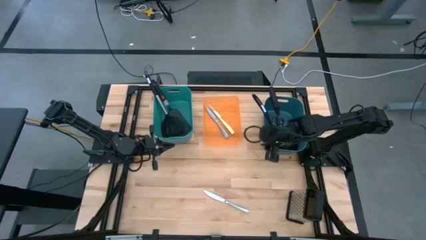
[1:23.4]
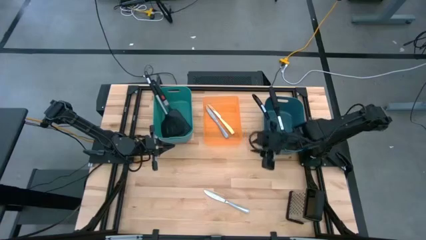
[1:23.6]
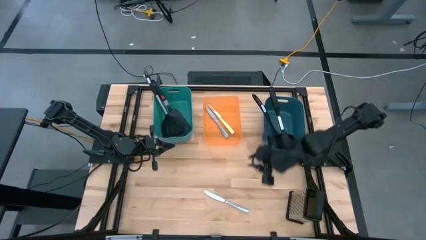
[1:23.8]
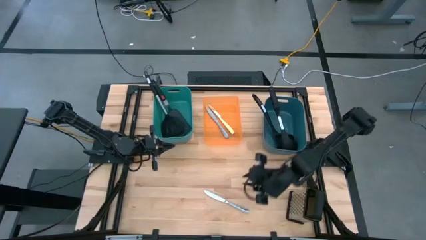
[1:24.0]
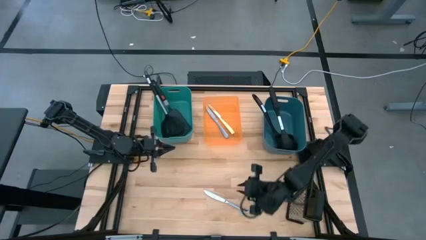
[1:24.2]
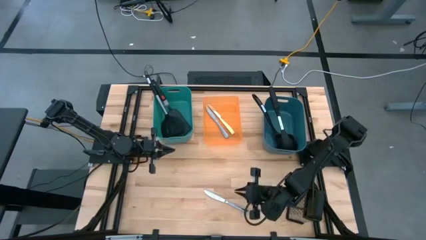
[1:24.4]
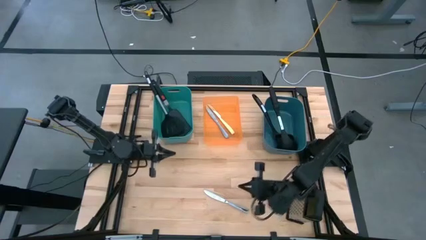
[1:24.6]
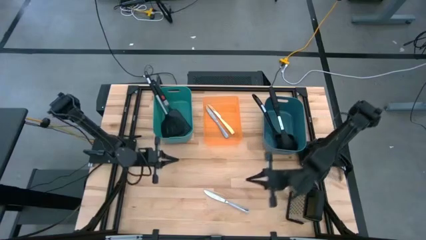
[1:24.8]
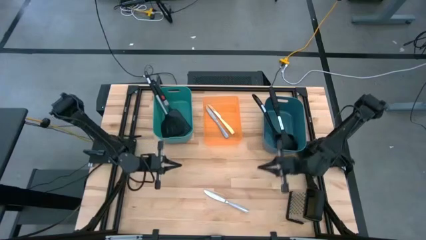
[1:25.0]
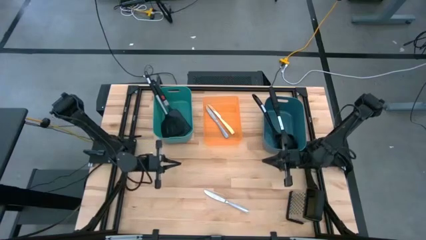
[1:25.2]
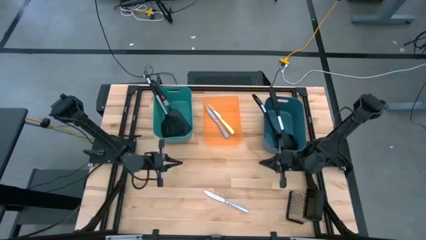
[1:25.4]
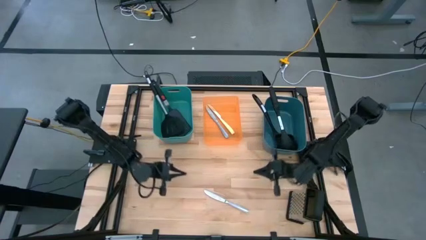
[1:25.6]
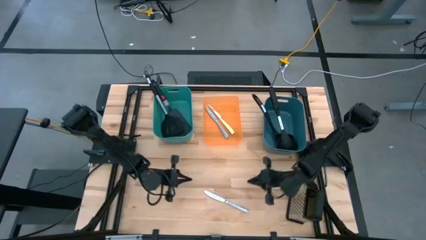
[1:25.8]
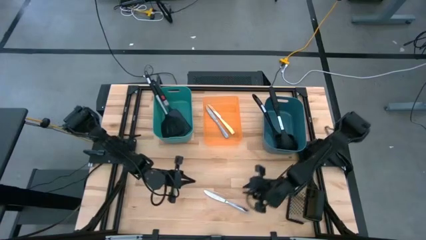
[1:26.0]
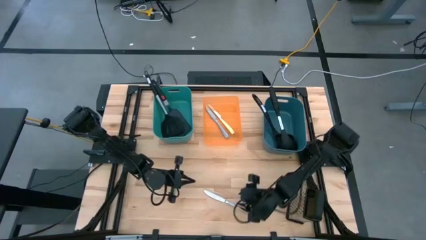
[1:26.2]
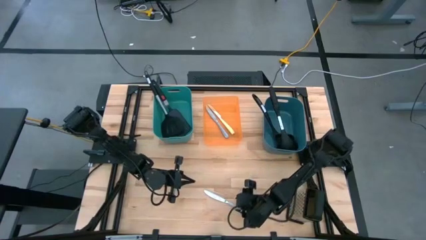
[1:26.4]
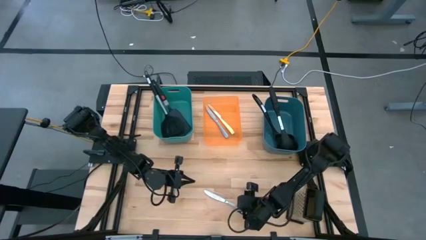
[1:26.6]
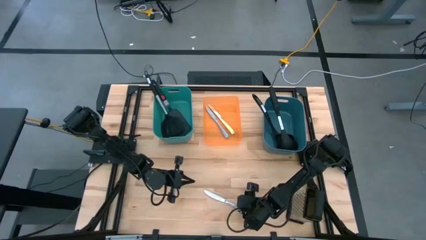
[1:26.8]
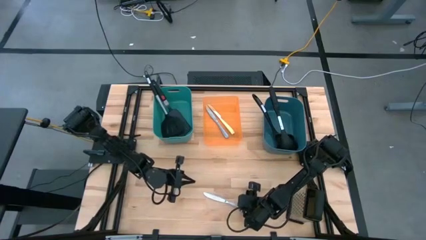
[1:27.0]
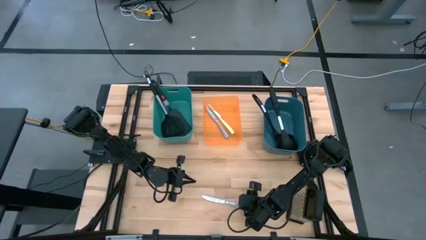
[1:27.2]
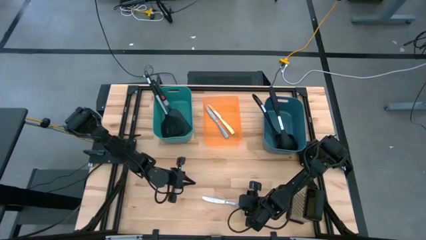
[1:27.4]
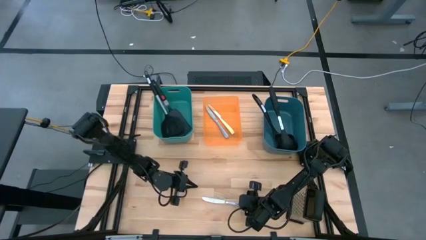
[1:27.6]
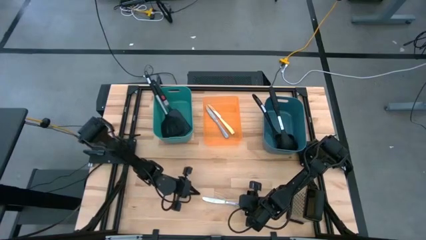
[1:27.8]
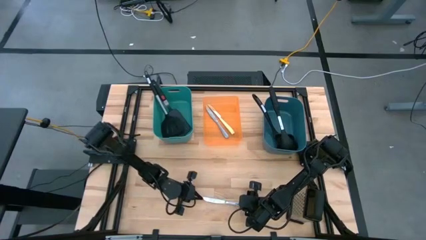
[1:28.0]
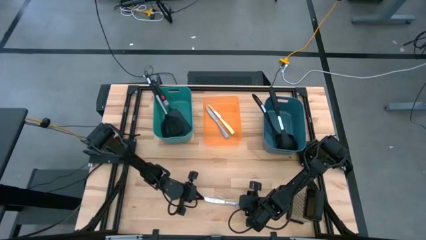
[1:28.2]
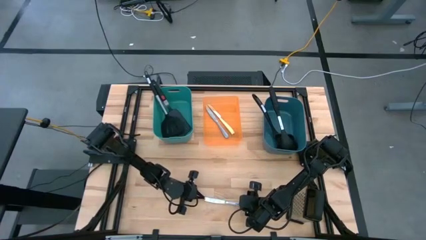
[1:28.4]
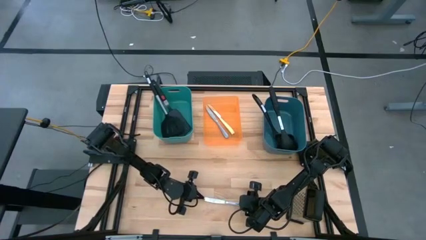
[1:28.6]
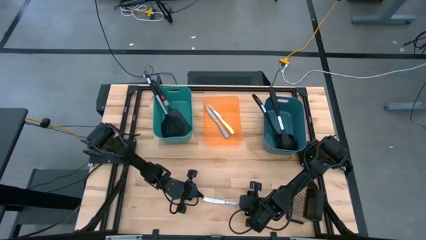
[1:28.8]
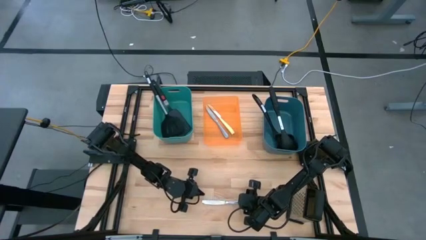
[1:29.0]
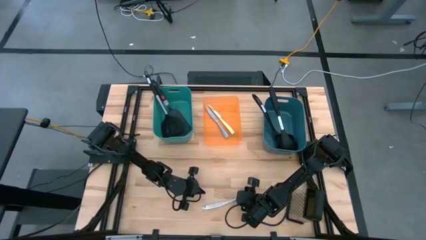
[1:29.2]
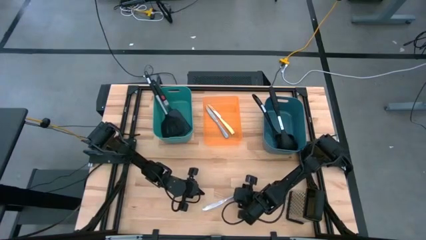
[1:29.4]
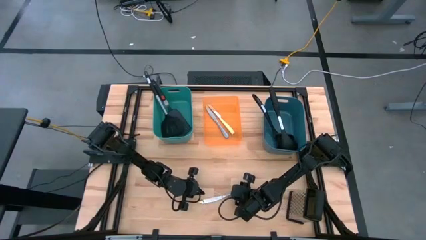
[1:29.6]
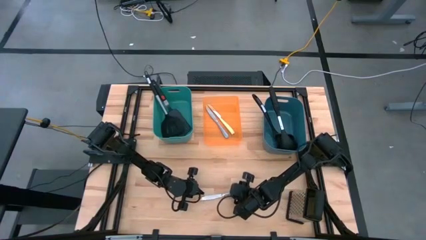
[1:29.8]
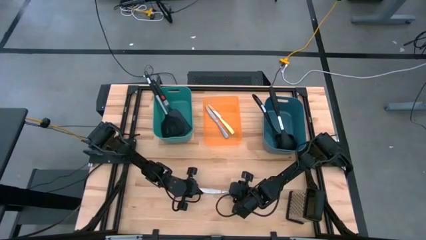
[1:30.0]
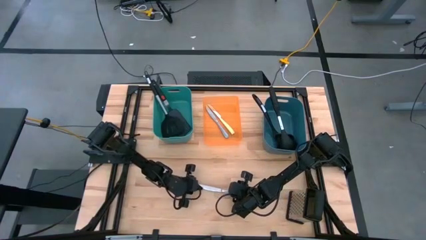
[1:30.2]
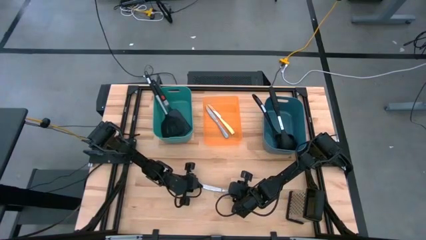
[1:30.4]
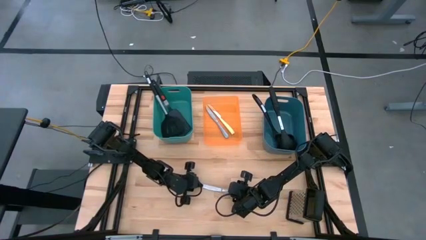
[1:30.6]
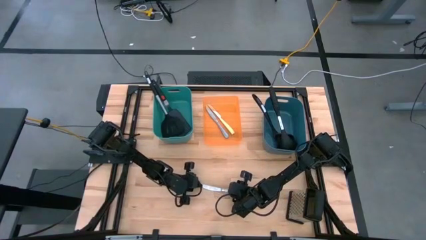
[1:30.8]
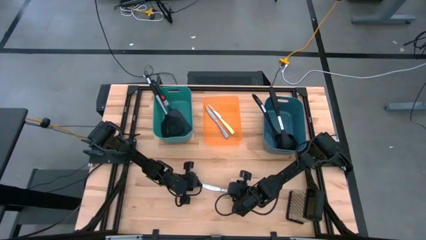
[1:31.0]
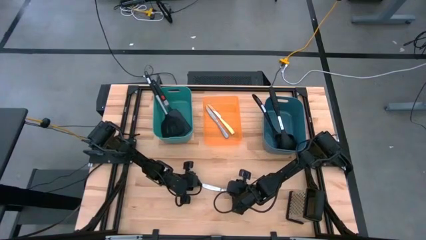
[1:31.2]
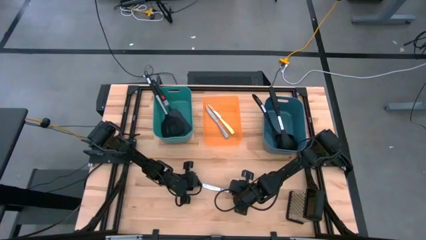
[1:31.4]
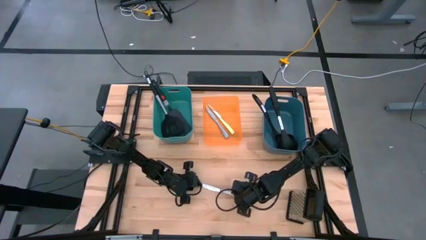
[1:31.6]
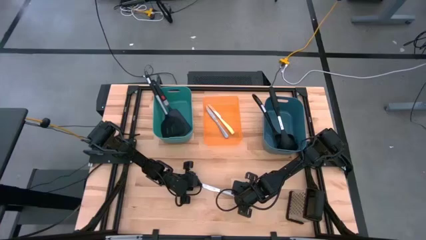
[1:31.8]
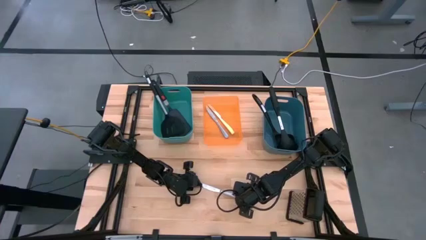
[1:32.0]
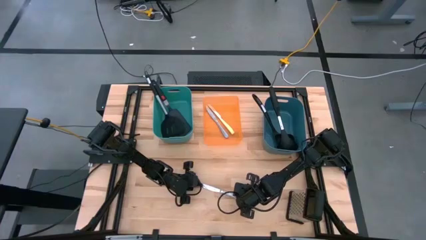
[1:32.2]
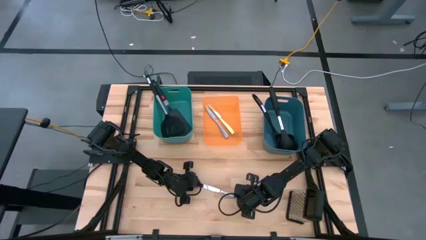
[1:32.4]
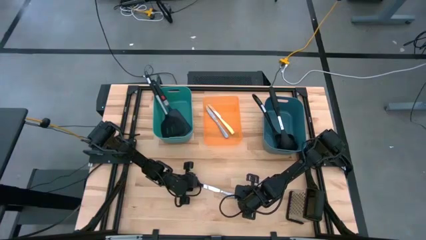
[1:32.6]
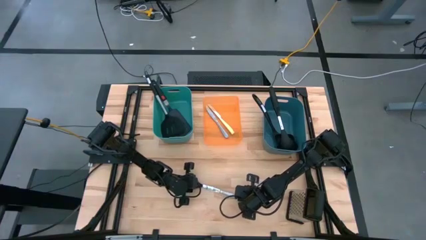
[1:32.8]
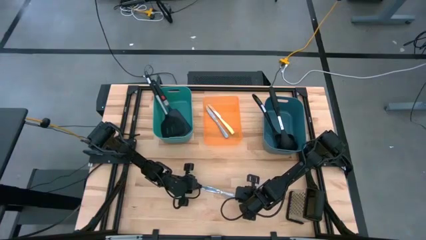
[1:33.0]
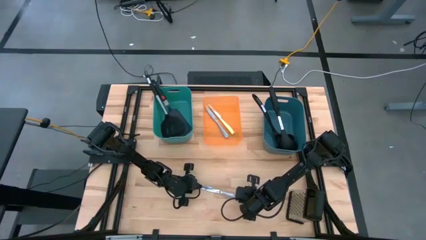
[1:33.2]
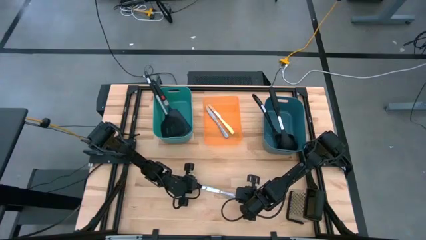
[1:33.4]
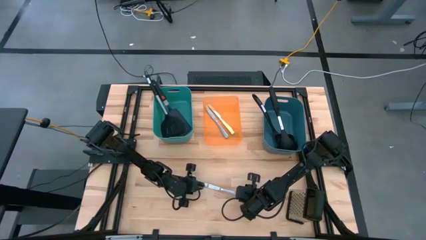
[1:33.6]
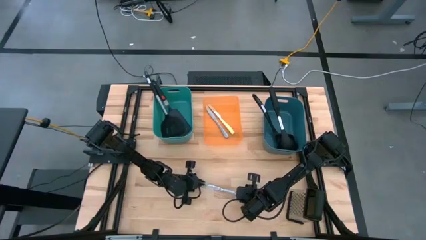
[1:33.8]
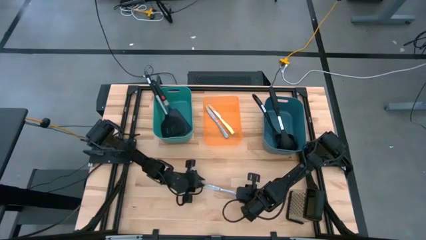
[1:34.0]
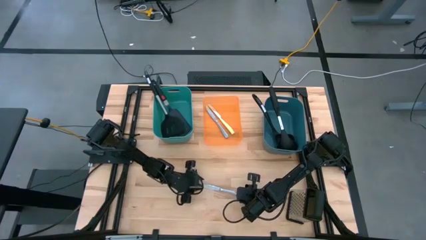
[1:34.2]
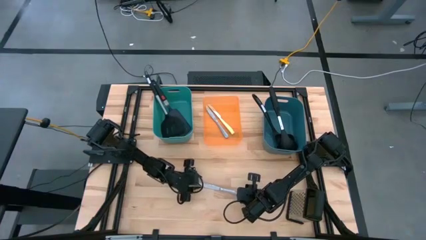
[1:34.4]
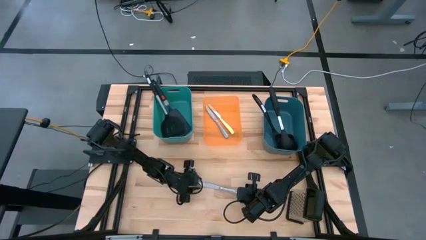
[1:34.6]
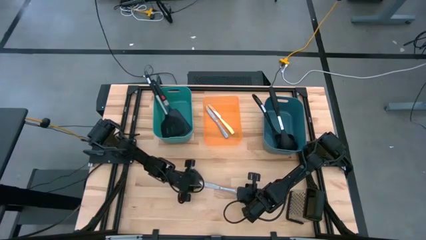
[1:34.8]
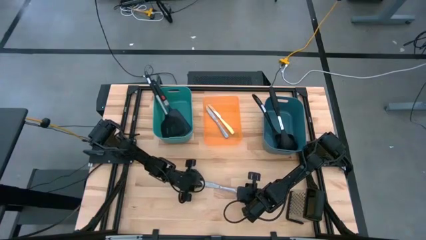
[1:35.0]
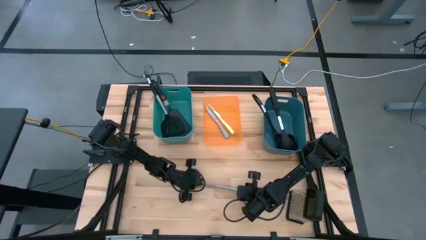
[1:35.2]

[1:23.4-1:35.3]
Task: Pick & Place Kitchen Items
Put the silver knife into the orange bin
